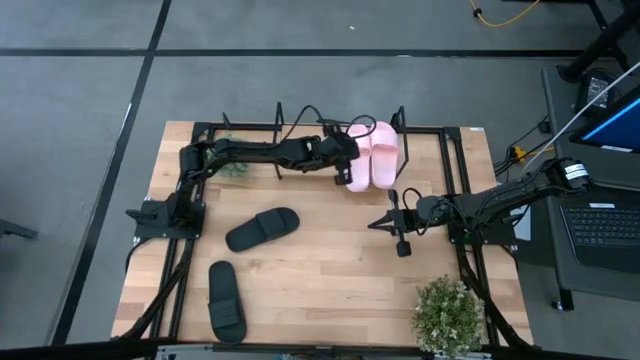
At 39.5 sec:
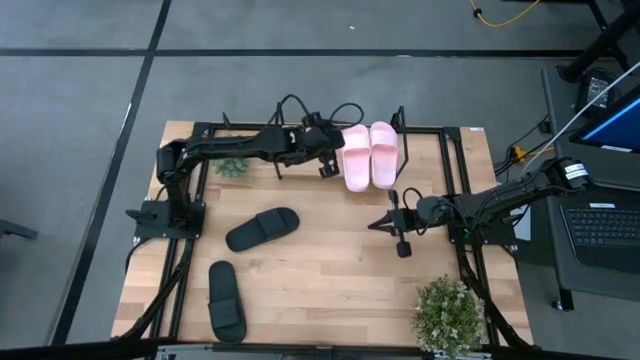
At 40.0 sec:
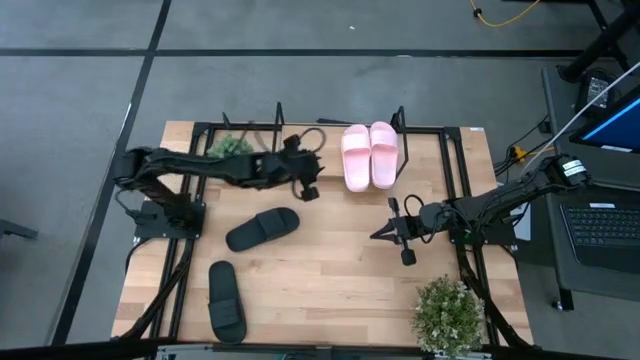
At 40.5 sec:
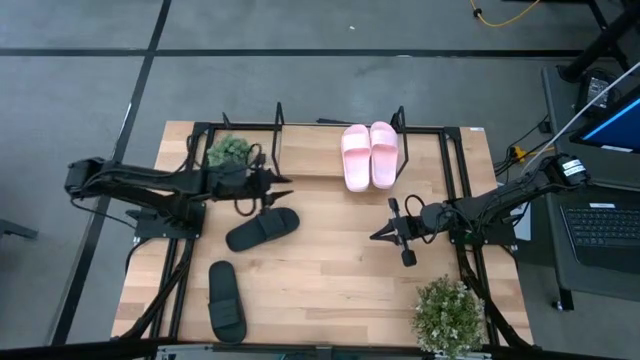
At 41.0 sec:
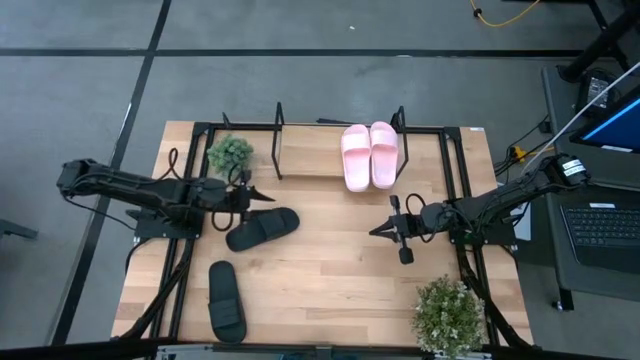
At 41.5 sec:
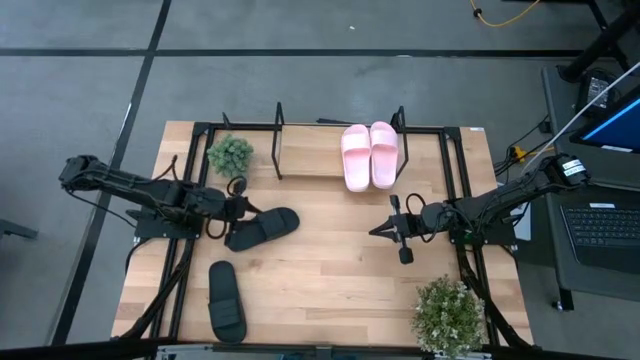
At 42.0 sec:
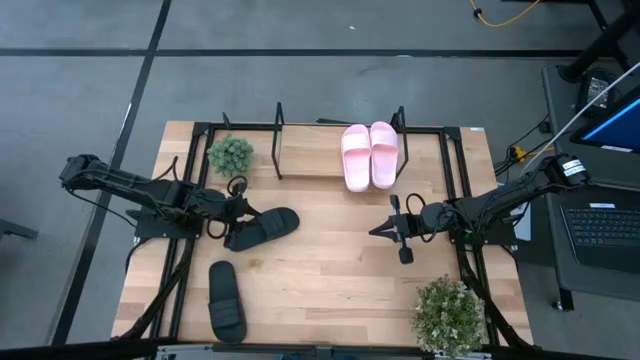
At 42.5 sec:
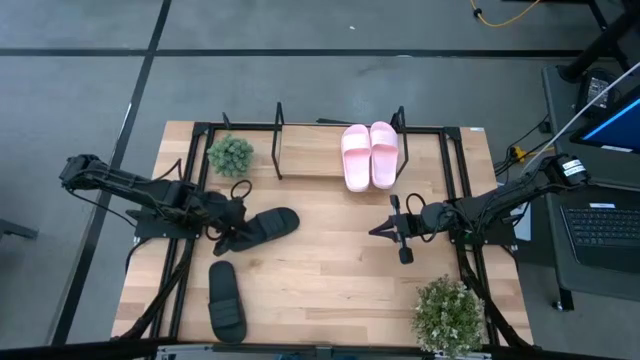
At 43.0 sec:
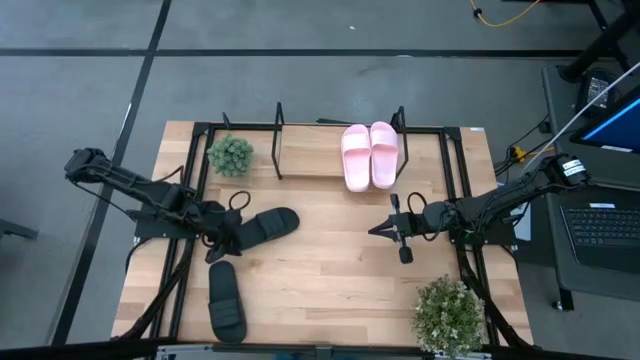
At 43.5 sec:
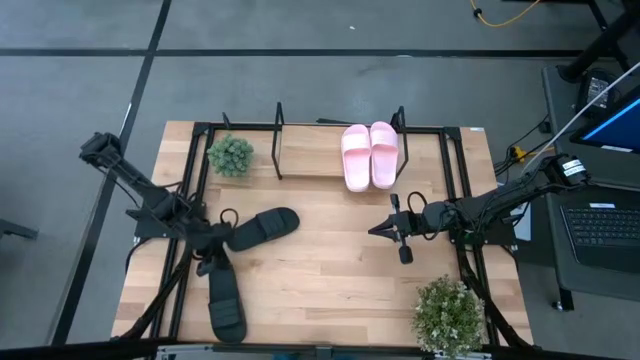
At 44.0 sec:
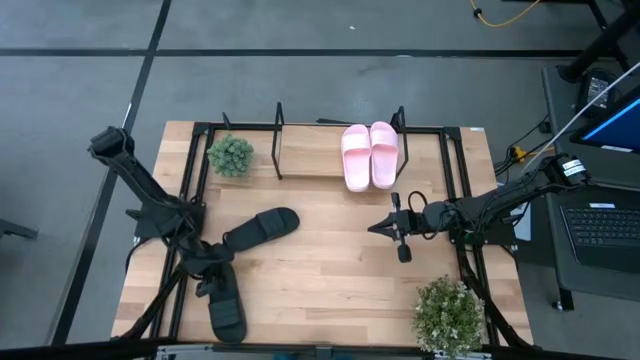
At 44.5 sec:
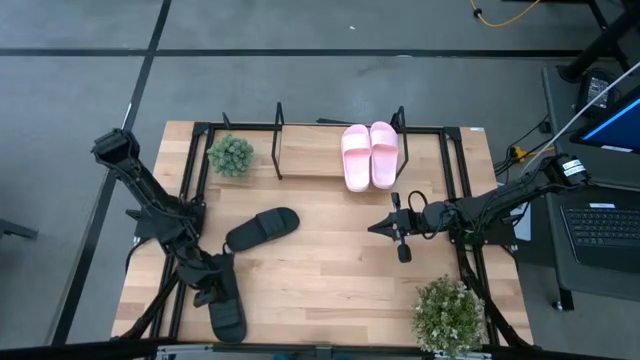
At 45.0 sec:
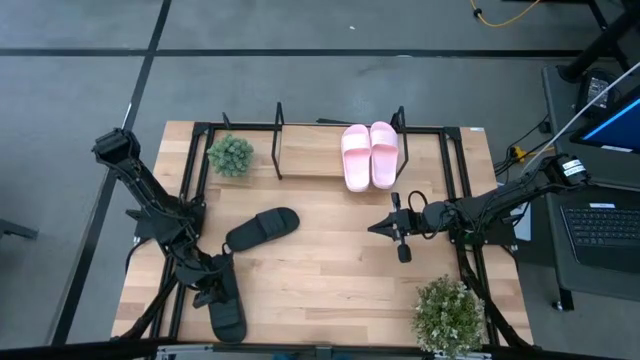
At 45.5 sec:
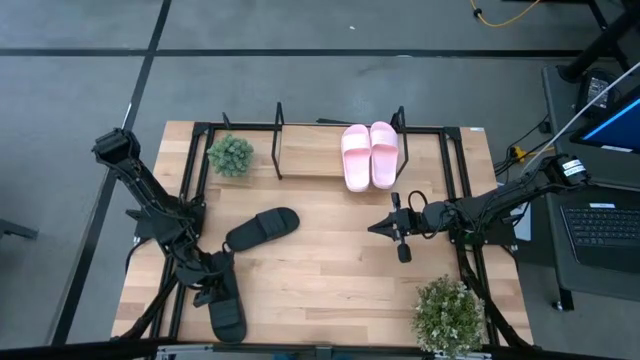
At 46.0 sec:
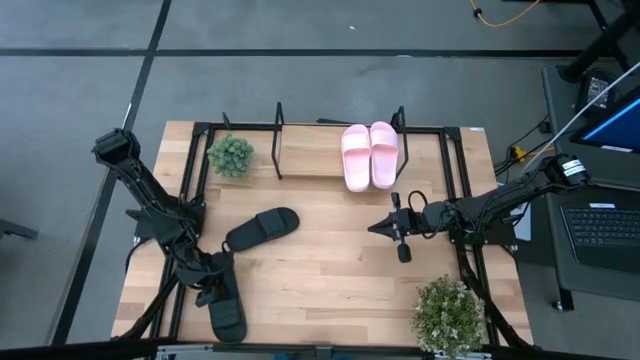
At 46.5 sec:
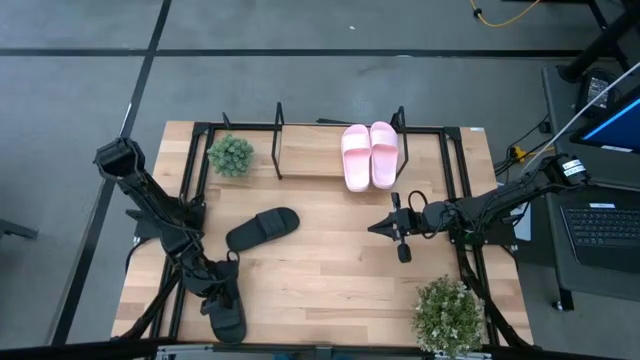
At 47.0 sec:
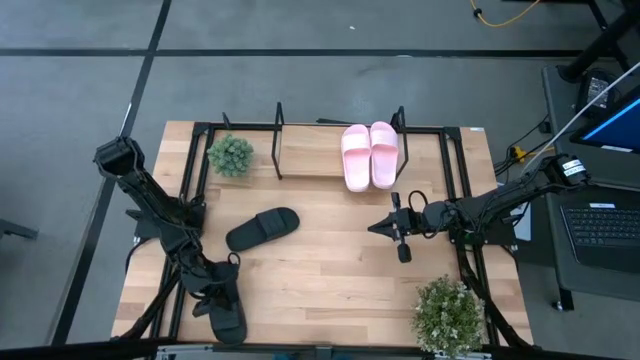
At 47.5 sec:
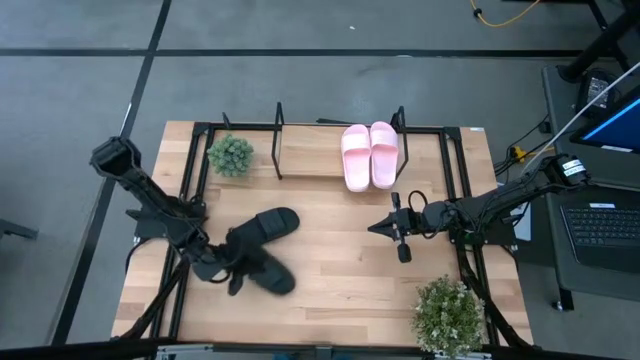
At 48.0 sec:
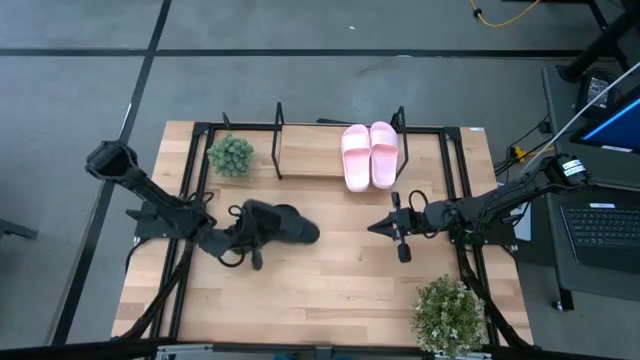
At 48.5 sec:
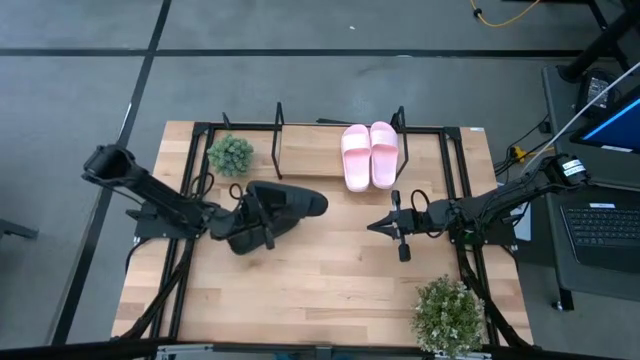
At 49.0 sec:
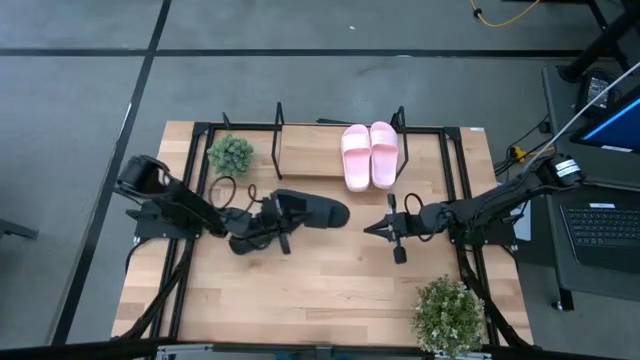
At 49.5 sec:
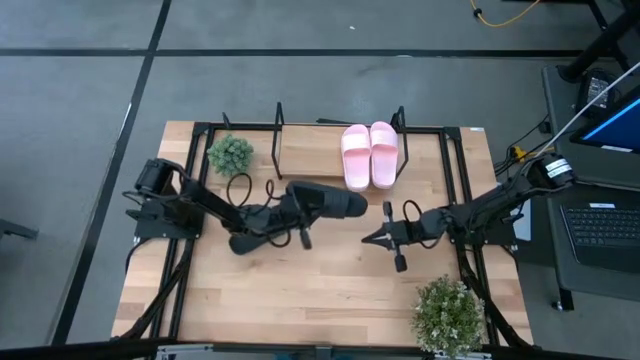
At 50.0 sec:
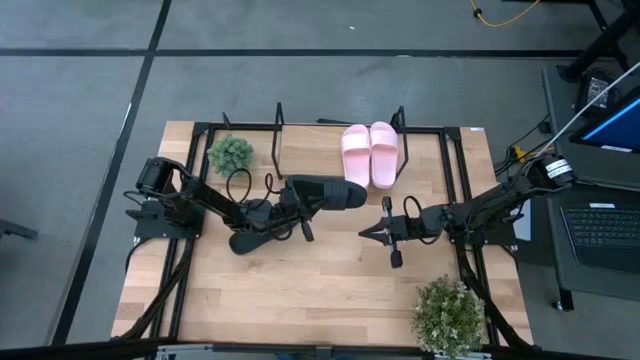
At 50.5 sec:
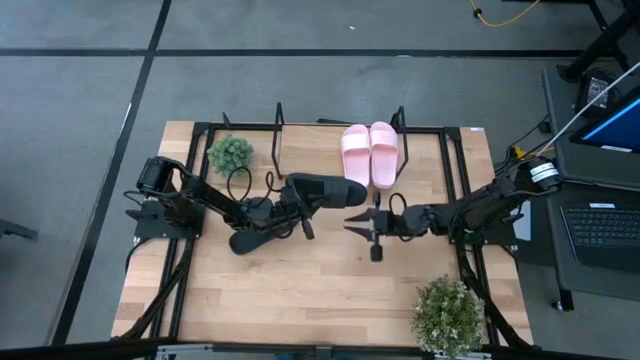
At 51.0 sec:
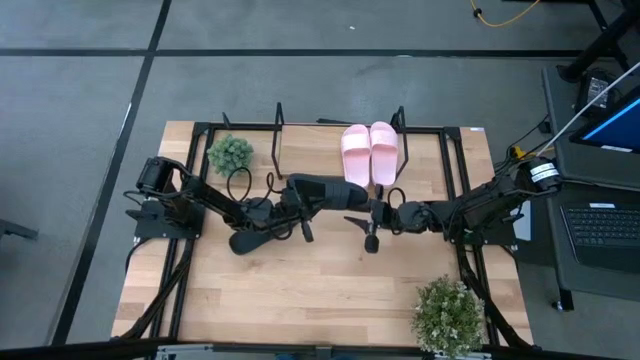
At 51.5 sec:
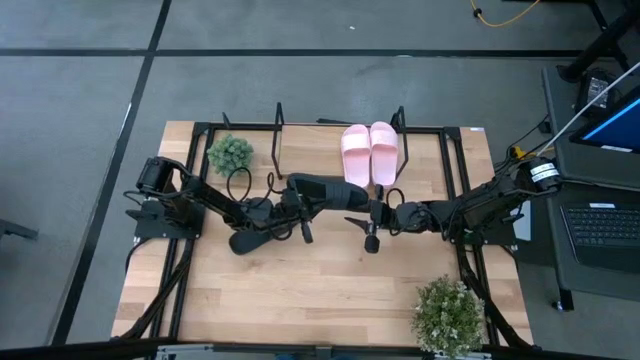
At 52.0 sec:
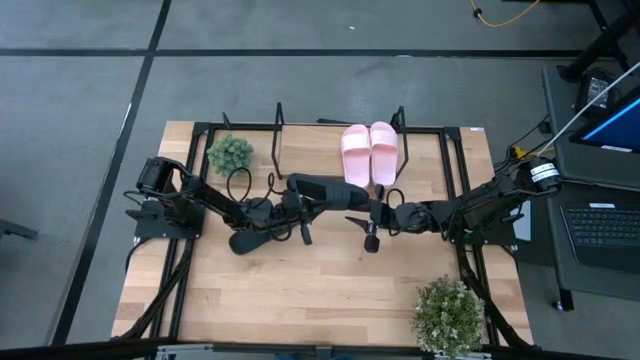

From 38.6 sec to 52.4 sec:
Task: Pick and place slides into the shelf
Put the bottom black slides on the shelf

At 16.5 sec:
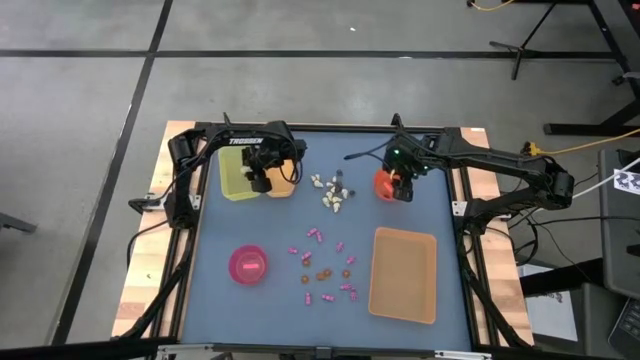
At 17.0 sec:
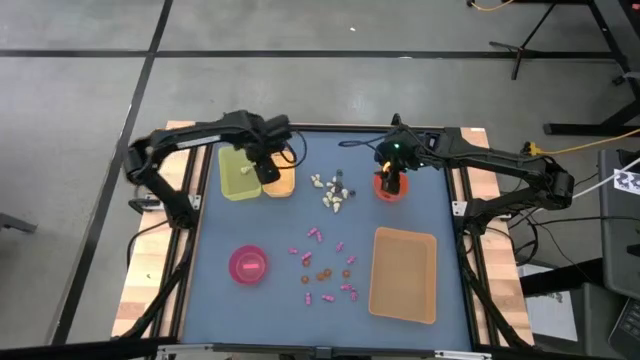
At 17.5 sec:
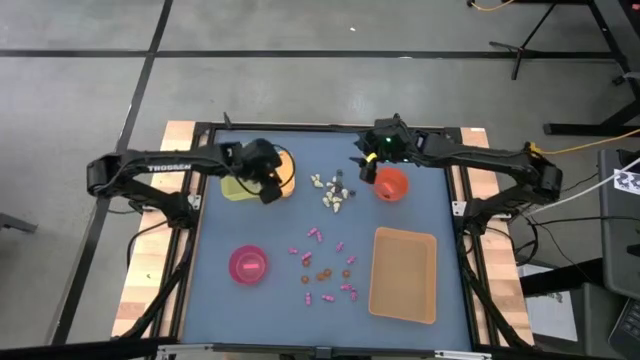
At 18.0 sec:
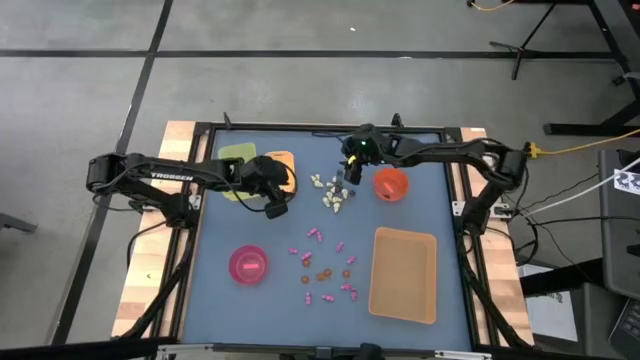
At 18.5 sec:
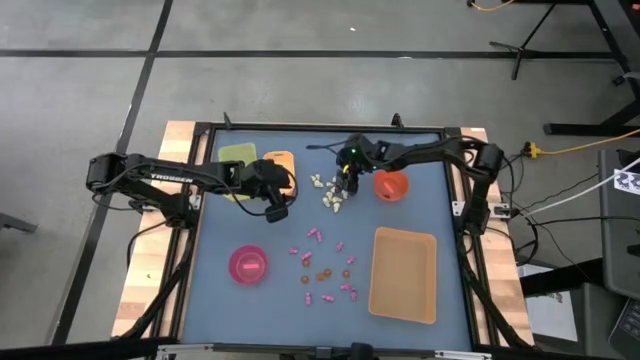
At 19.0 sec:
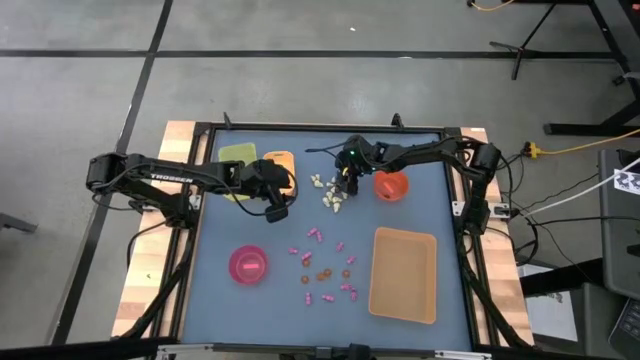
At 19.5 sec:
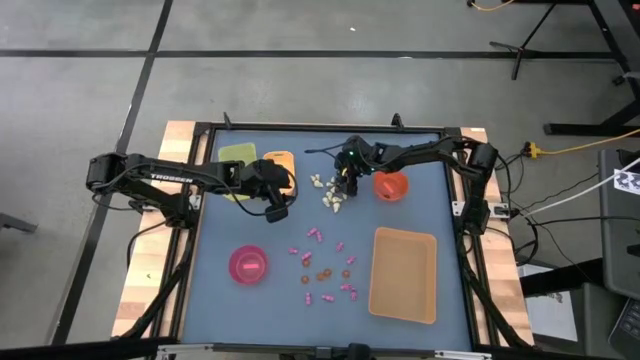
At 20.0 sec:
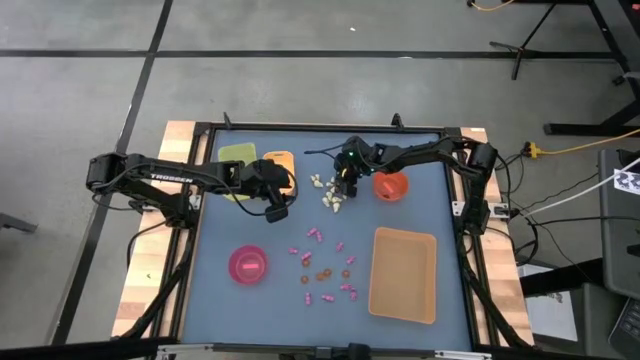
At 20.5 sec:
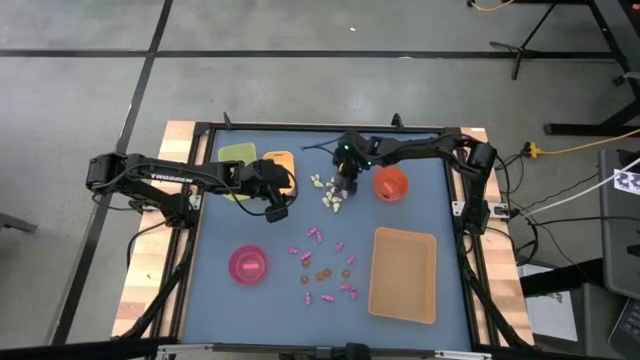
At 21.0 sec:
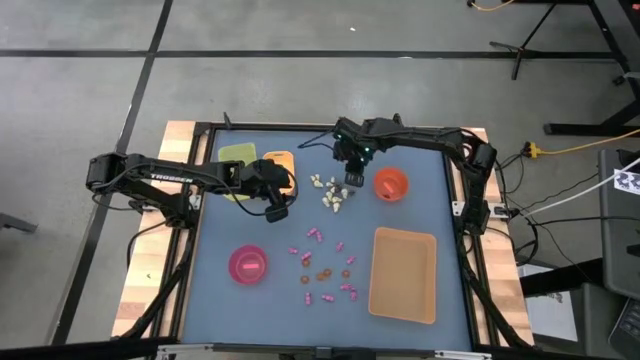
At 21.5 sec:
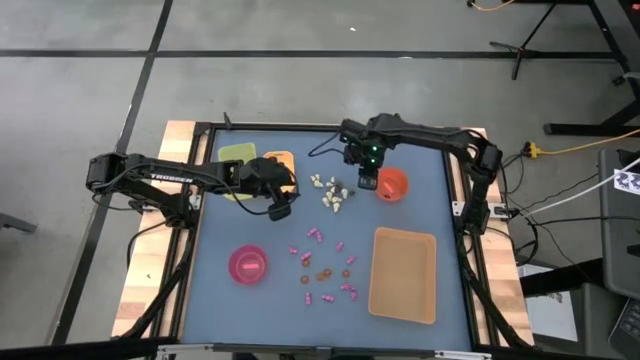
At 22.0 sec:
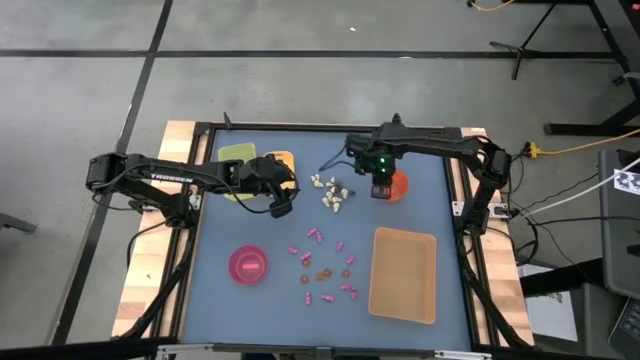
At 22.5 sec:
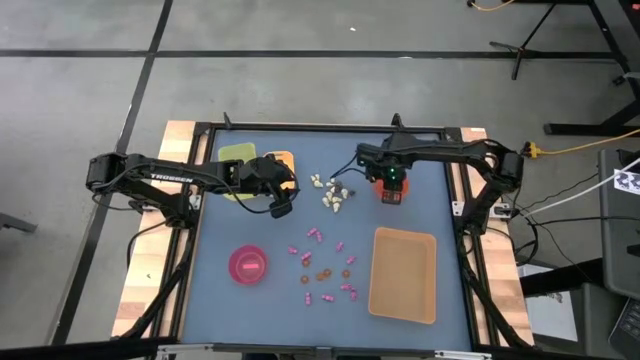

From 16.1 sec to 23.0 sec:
Task: Sort Halloween decoration
Put the black skull toy into the orange bowl
